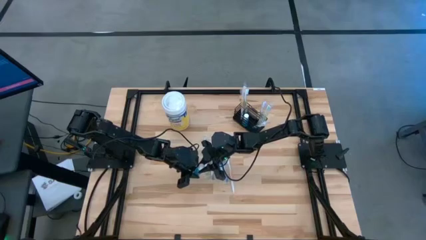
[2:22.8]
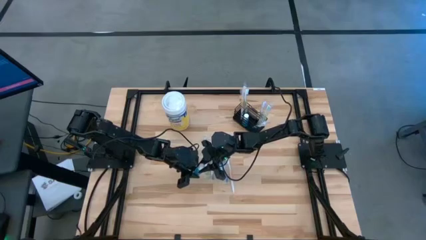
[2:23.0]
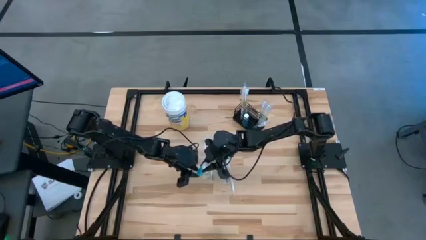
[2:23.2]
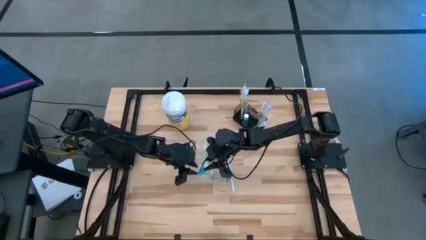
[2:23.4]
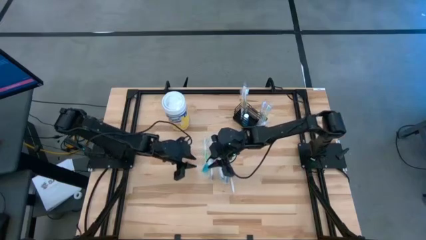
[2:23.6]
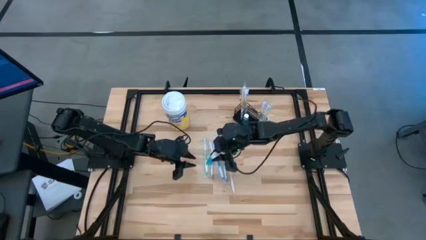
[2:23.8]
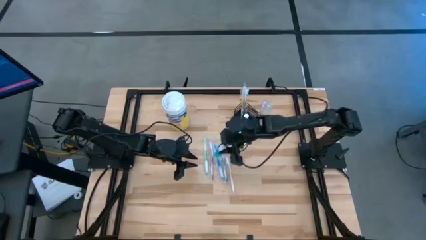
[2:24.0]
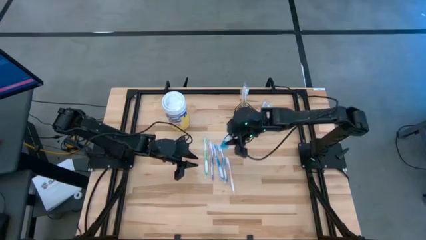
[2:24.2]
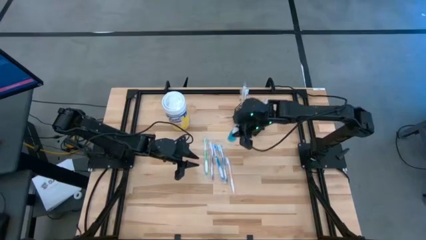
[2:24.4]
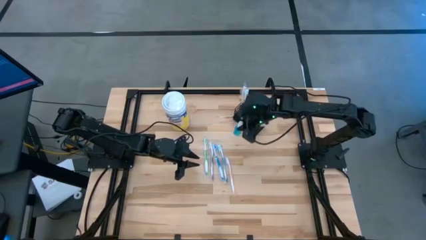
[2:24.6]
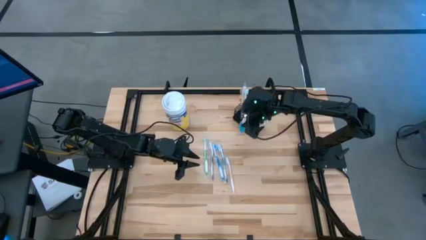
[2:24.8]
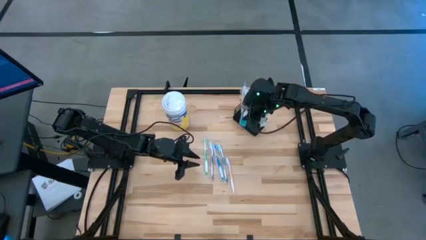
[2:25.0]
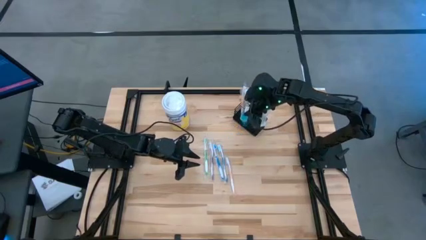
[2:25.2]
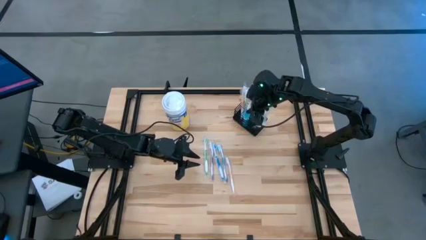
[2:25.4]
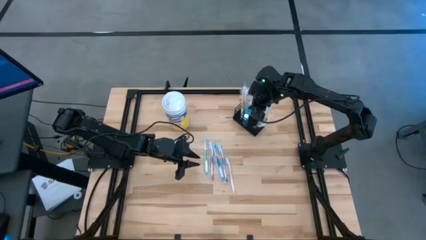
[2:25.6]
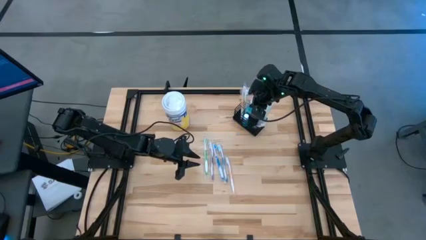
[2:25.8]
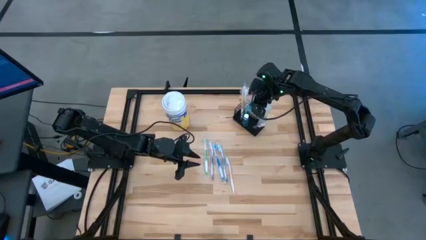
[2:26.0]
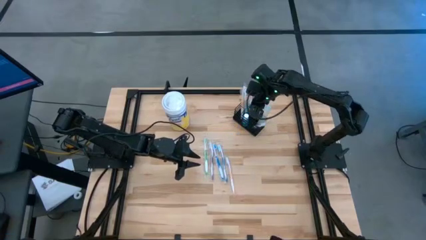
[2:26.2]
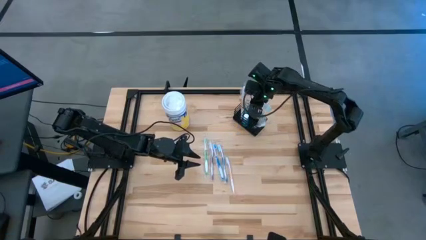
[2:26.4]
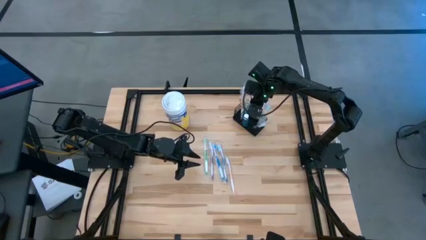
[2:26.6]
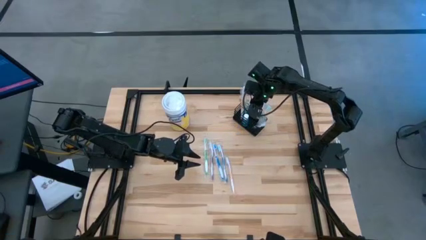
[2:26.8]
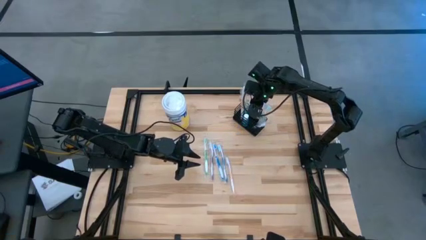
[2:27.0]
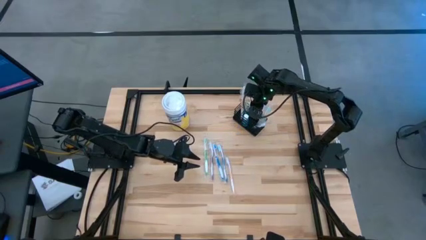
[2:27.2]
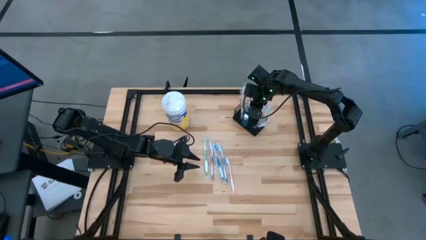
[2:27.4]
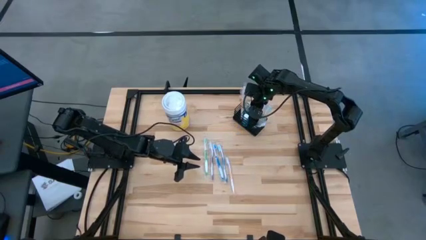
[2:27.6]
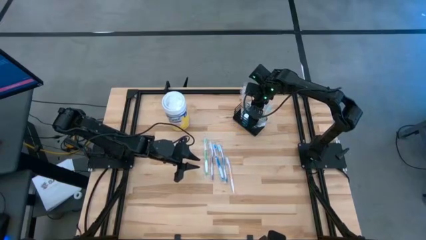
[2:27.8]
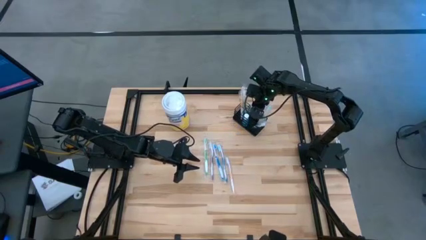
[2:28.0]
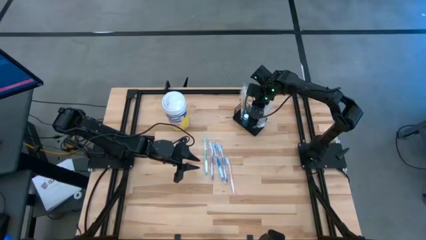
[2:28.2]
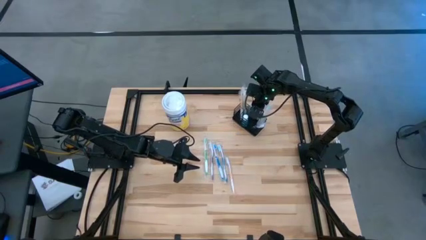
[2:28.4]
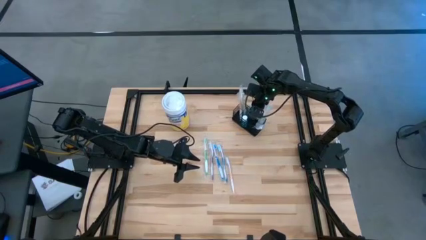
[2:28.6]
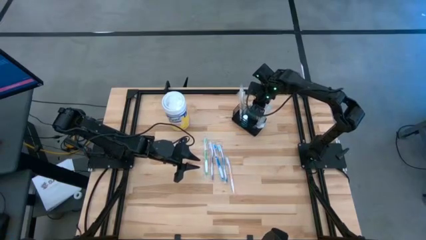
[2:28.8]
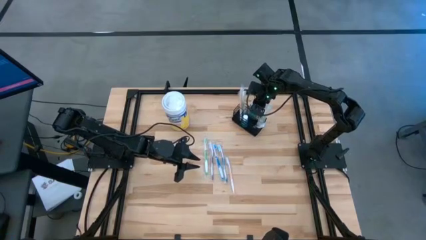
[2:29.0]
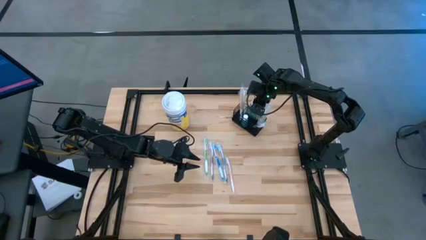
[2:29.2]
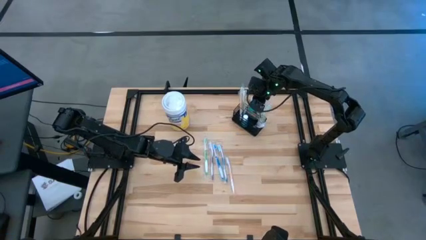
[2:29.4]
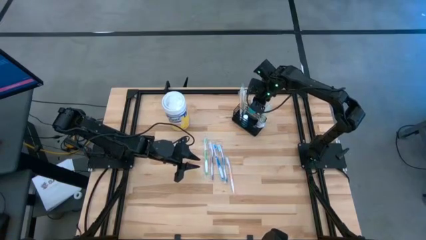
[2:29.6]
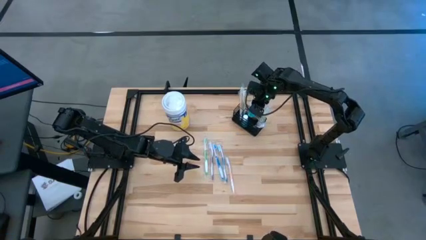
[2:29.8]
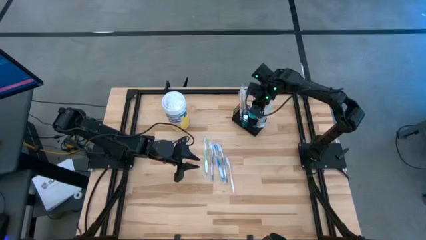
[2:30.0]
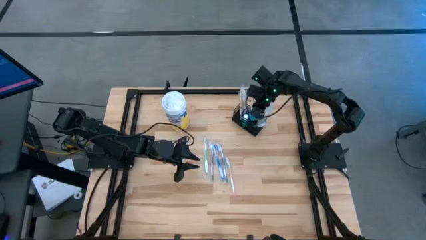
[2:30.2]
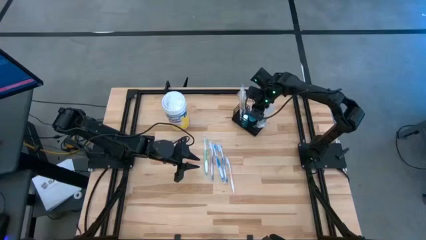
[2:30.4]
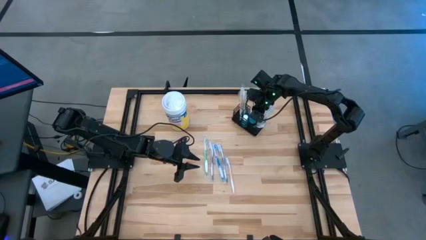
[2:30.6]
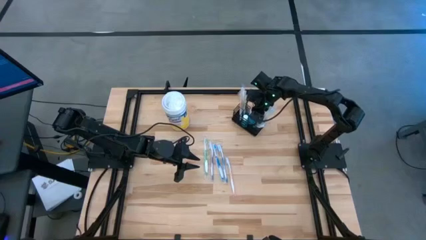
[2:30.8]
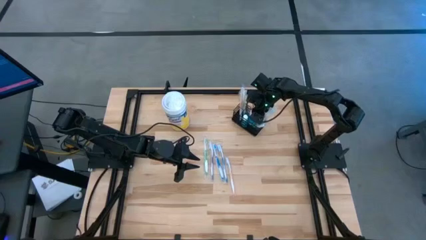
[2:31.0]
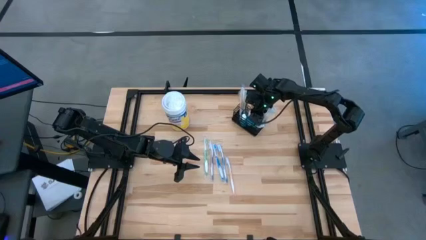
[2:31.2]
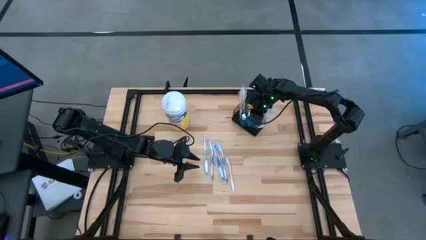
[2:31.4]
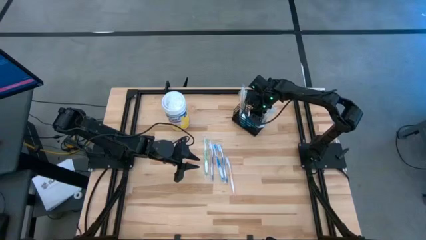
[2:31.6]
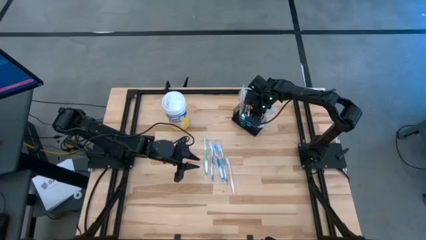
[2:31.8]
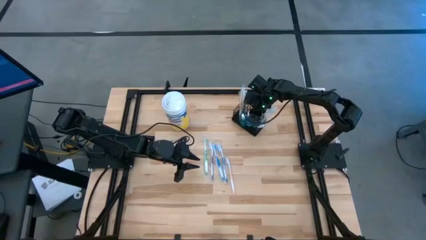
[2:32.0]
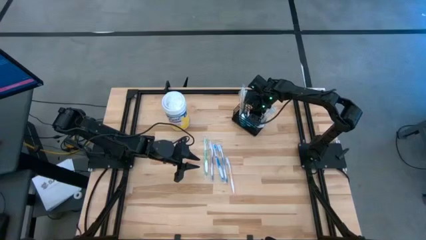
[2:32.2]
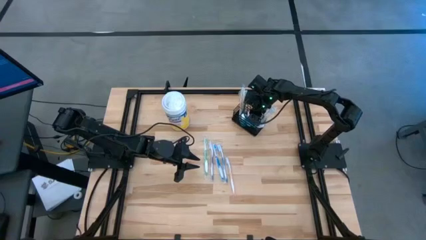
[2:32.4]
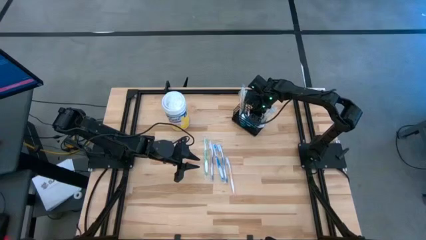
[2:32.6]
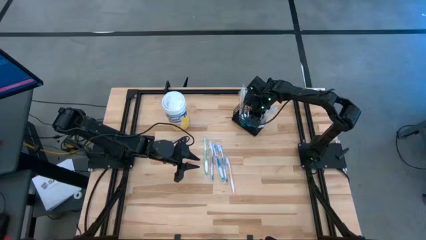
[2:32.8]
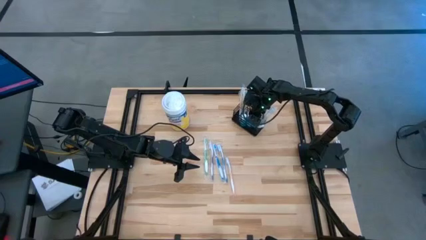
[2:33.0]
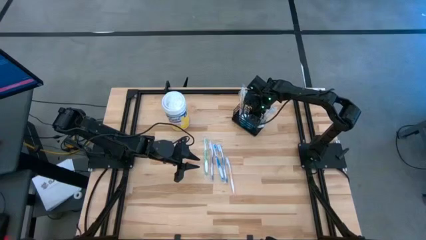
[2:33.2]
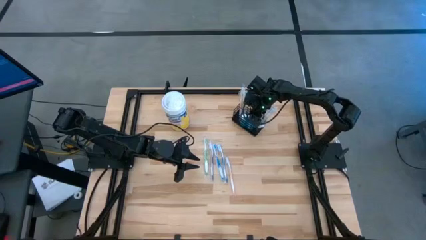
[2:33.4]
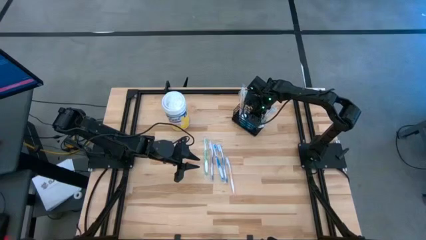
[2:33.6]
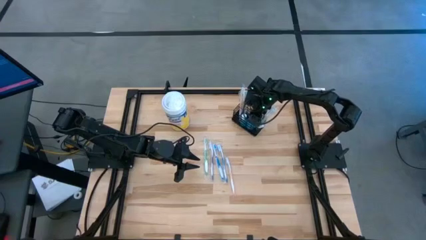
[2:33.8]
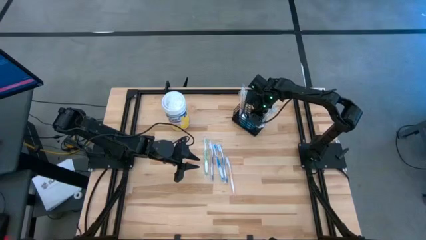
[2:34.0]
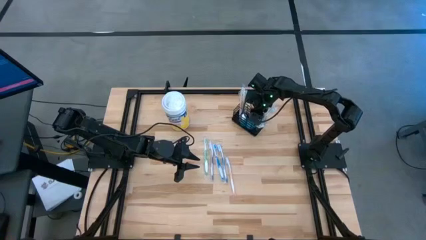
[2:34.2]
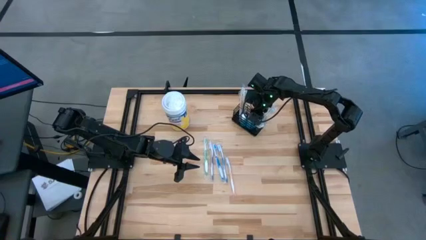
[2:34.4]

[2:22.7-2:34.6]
Task: Pick & Place toothbrushing station
Put the blue mouthwash into the black wire organizer

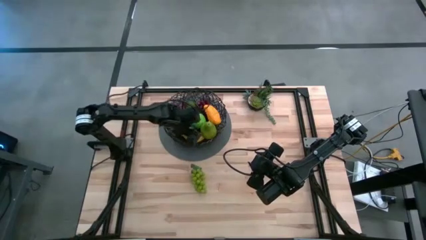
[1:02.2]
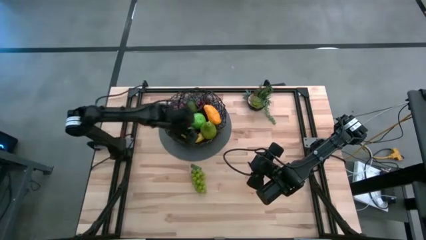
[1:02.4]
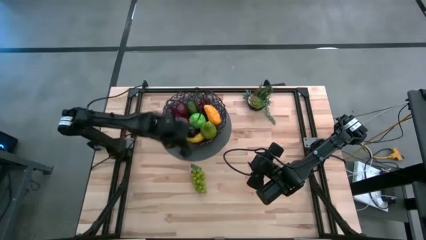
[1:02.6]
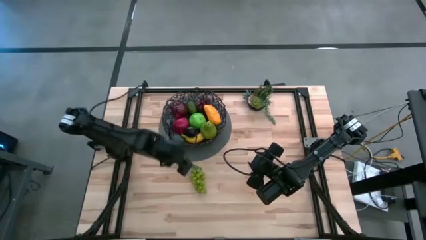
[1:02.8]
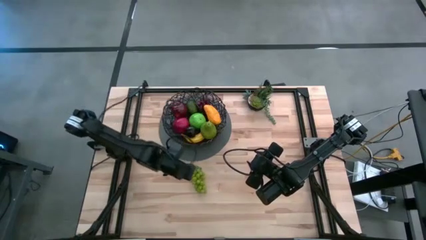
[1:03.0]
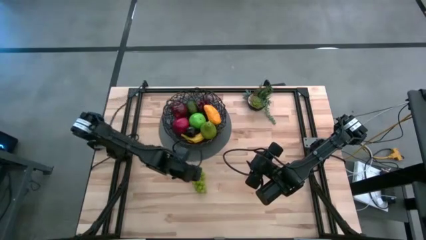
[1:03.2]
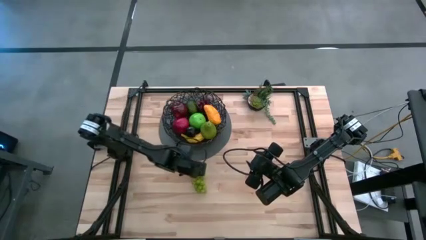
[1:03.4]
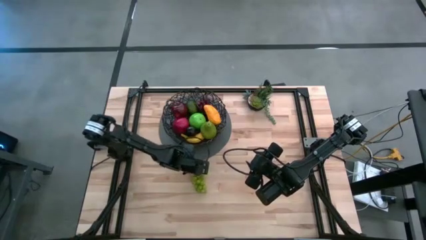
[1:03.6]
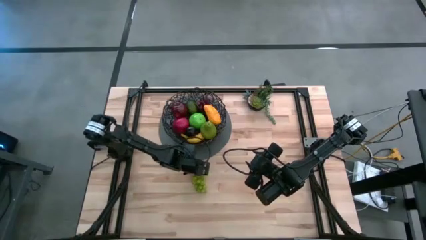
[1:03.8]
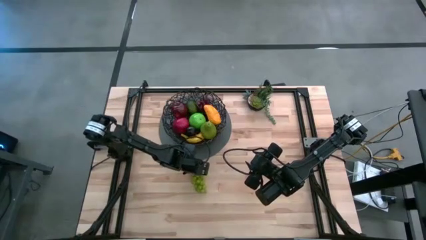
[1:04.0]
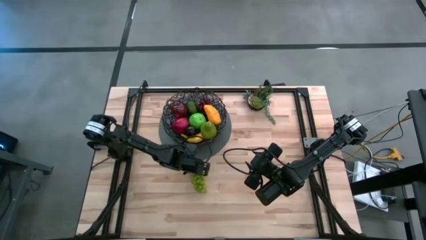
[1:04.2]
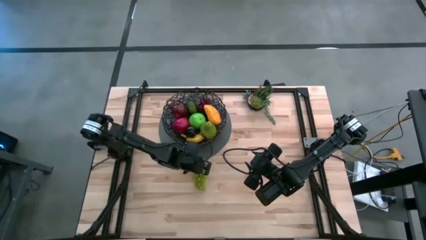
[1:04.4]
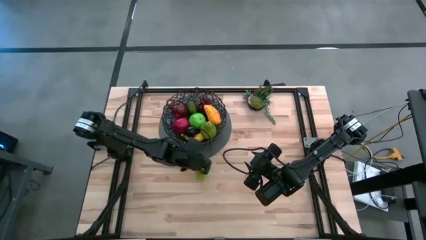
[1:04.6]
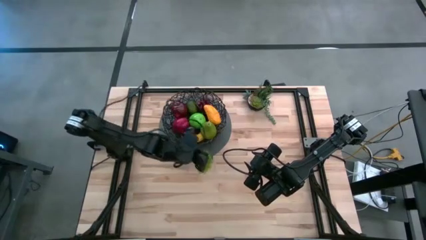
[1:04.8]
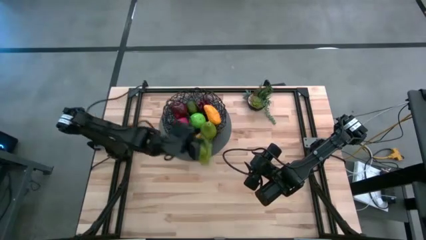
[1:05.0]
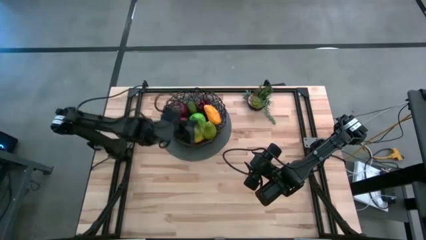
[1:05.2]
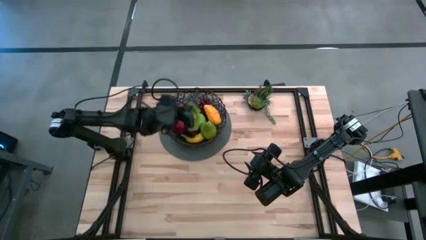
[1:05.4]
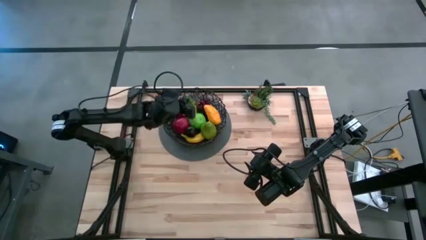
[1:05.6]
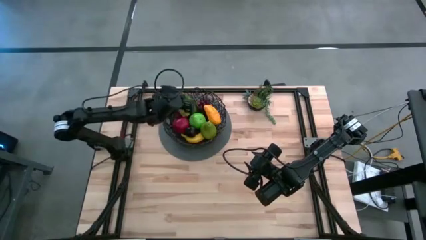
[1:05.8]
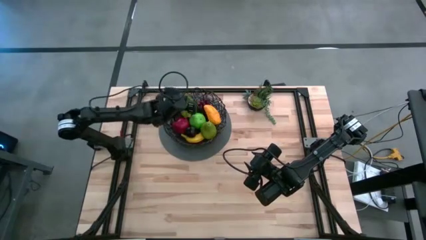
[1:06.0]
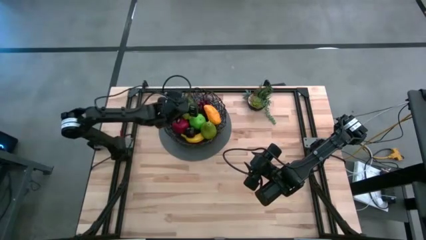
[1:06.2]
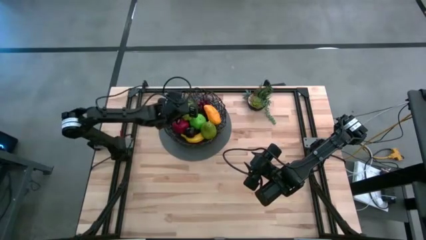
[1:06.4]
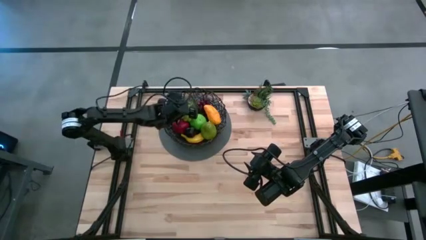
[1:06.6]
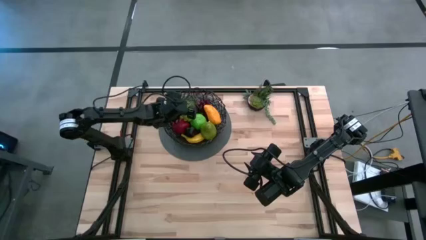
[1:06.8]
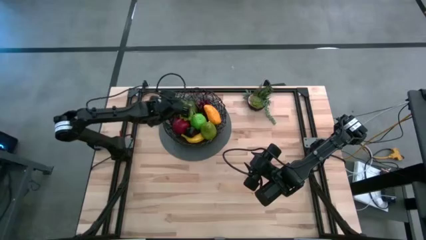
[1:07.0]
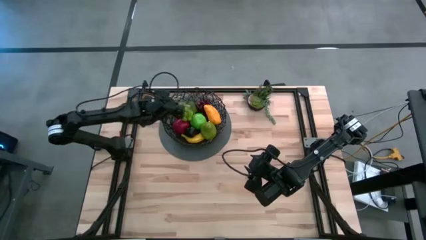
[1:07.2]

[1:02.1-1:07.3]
Task: Build produce basket
Put the green grapes into the black wire basket
